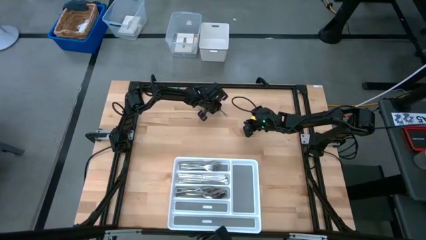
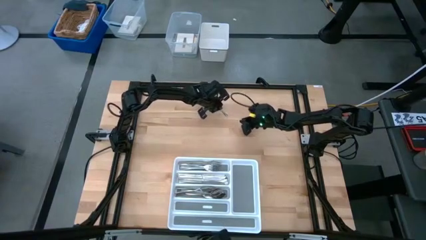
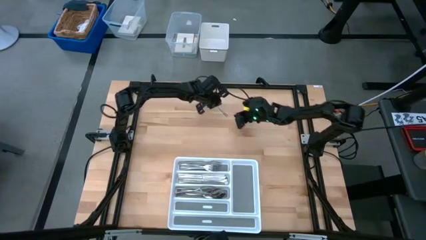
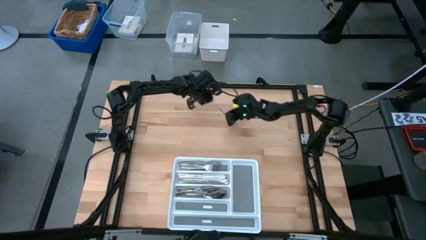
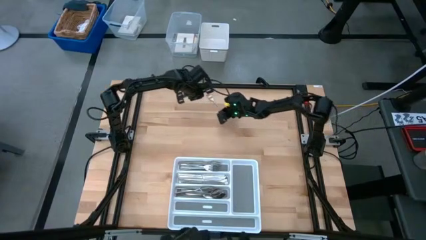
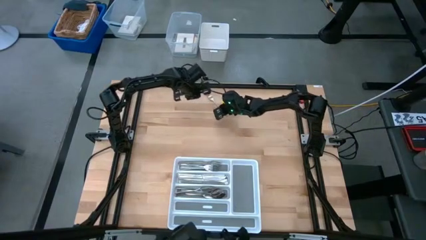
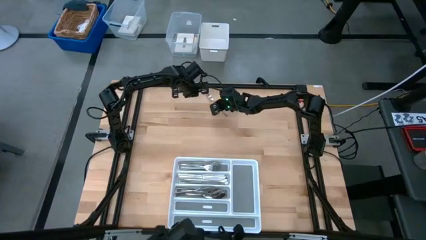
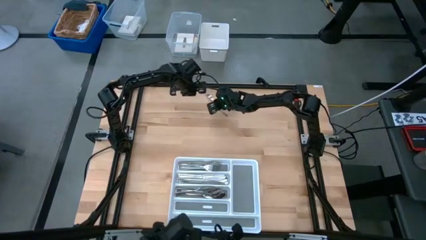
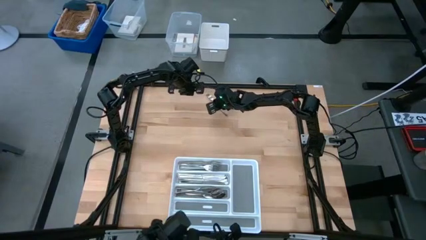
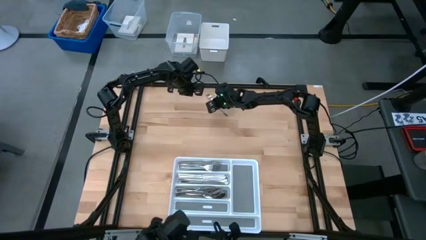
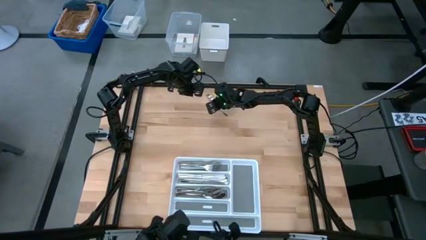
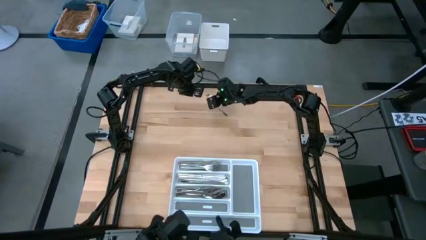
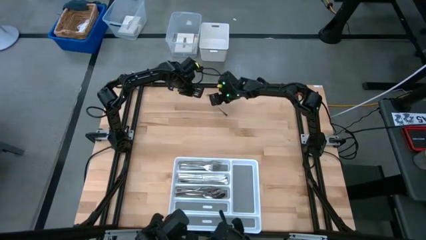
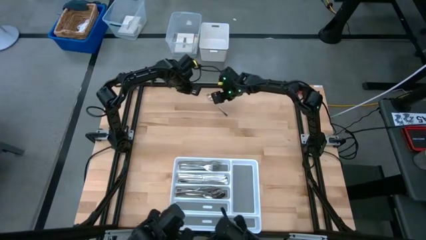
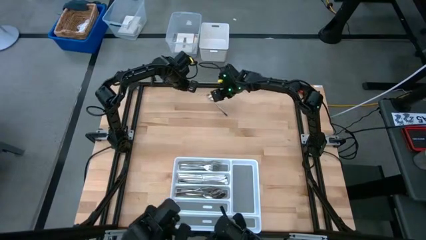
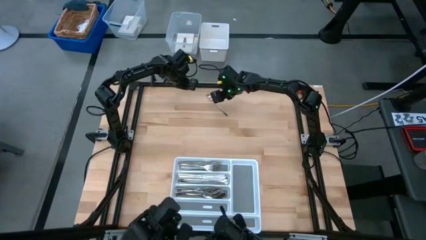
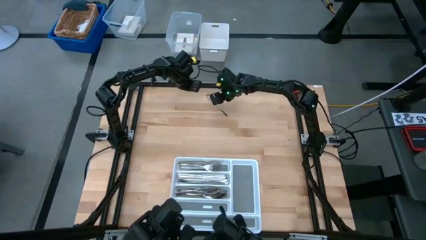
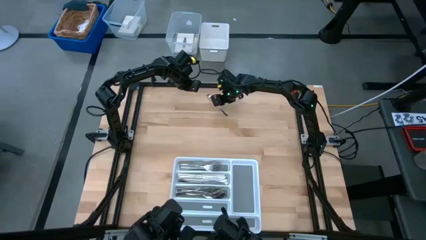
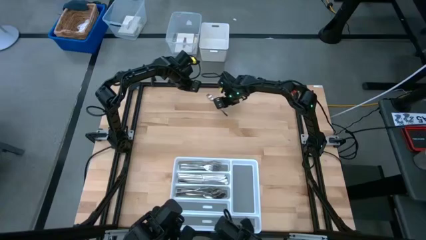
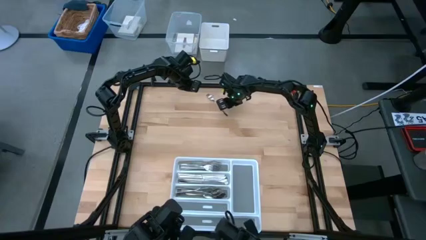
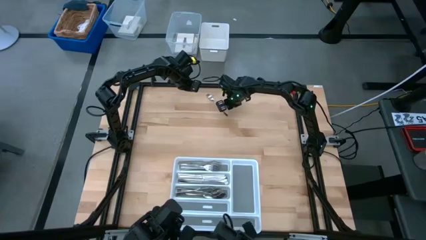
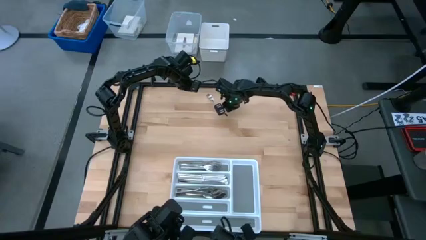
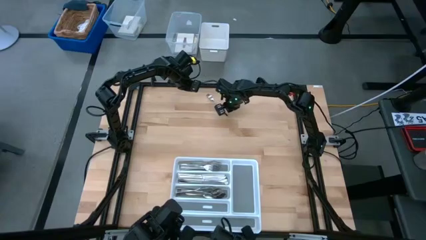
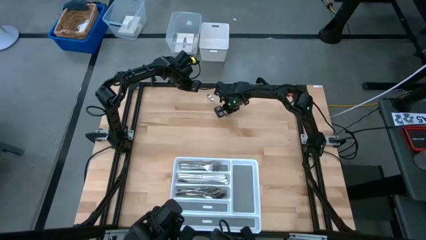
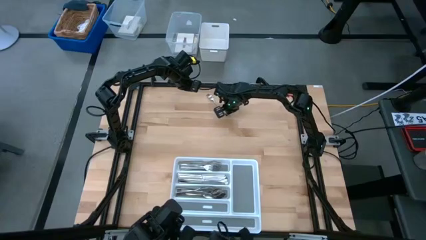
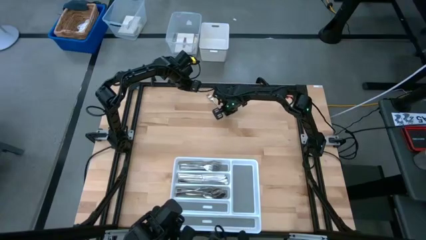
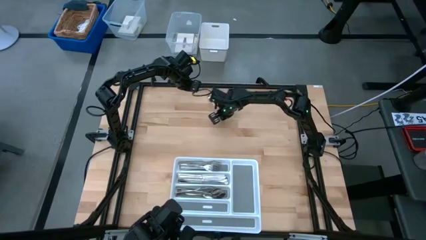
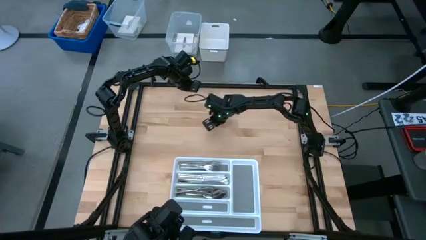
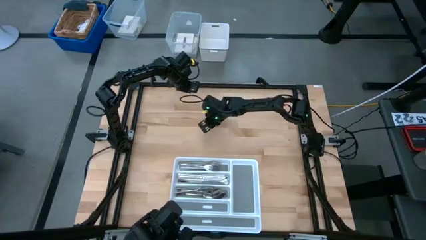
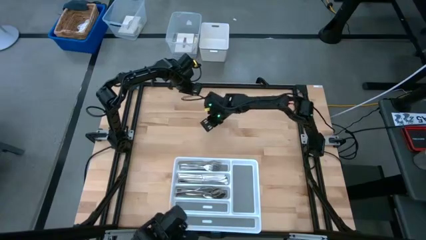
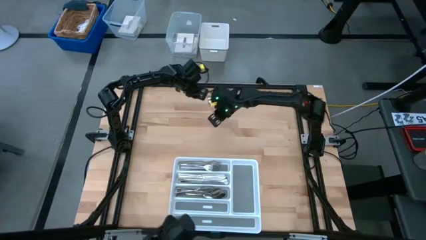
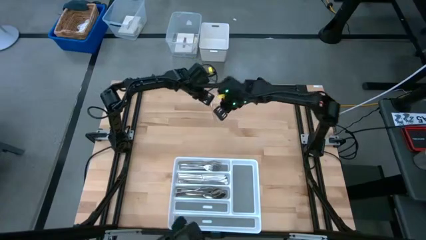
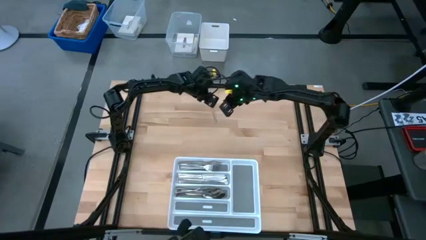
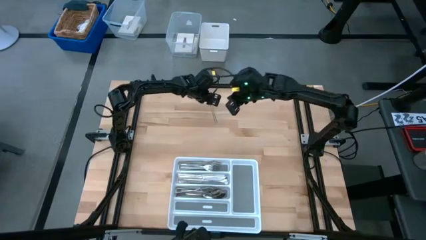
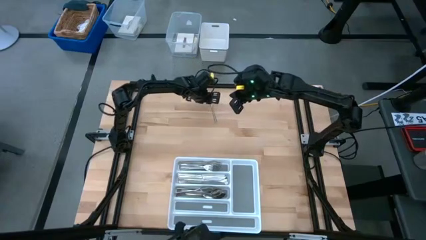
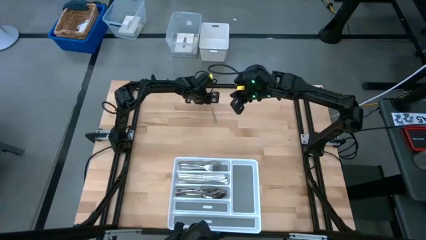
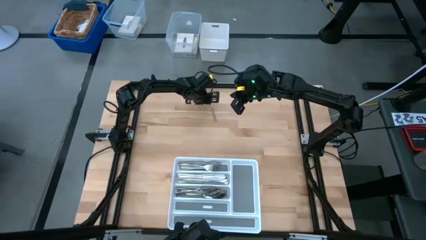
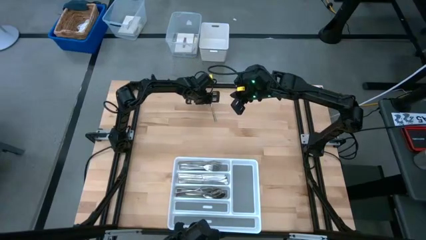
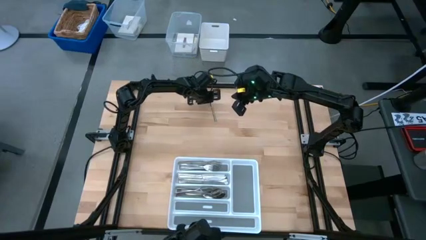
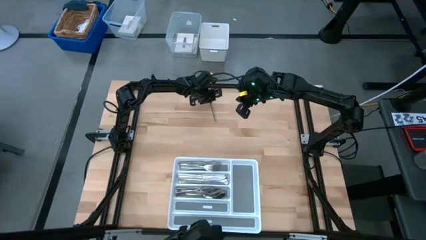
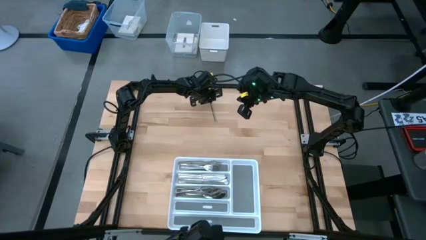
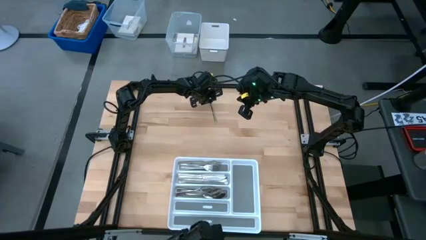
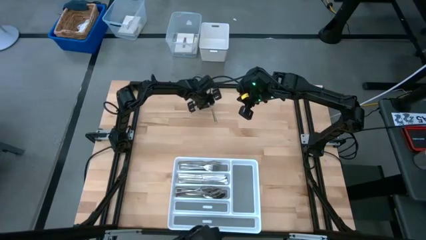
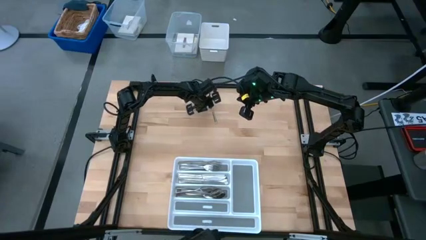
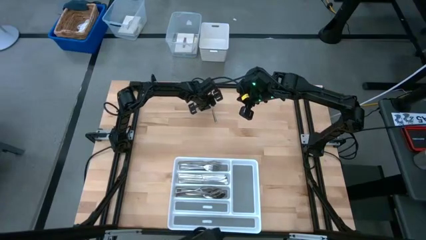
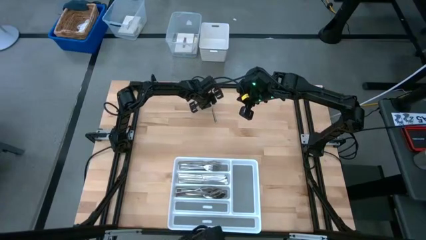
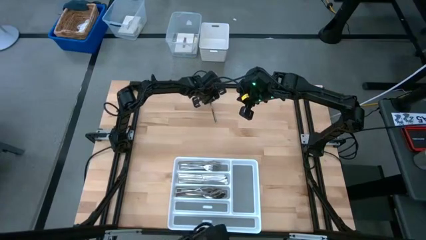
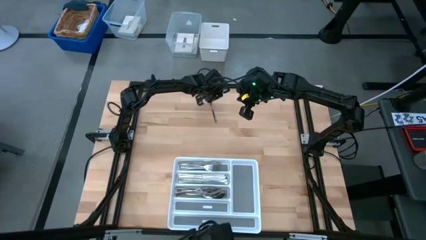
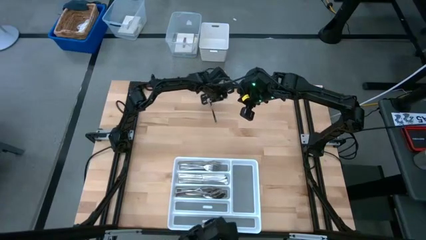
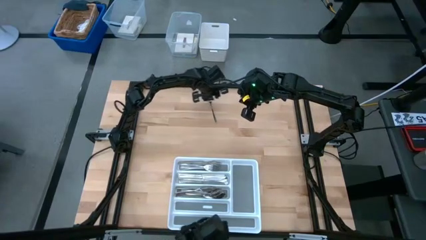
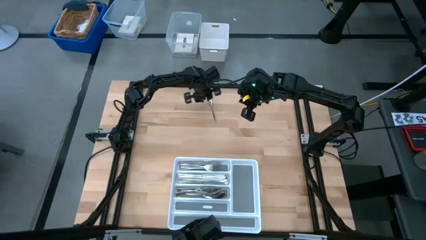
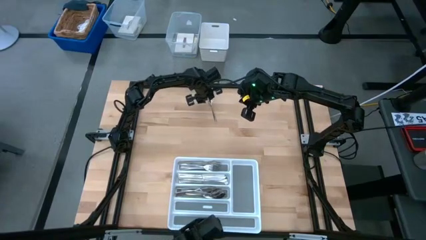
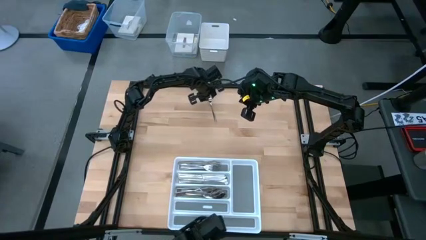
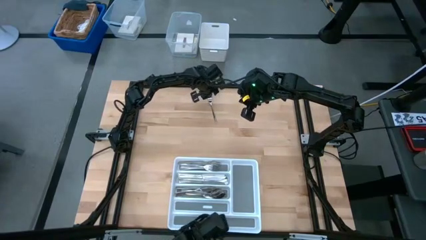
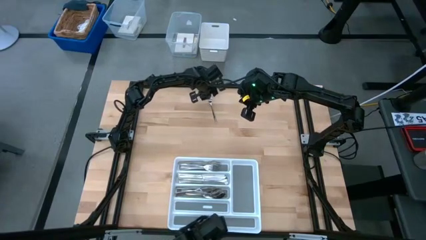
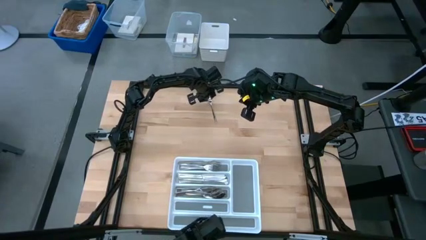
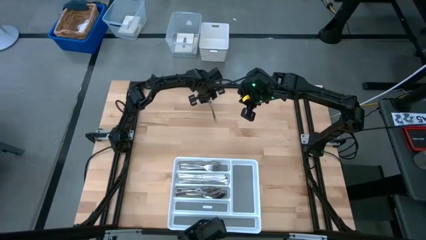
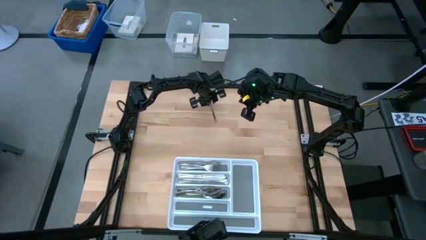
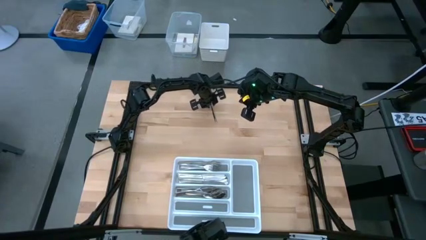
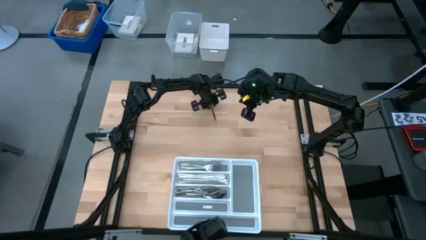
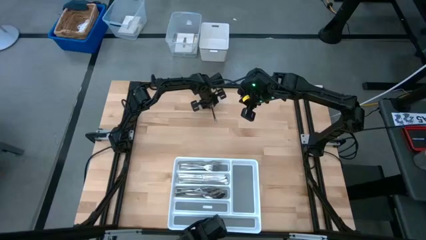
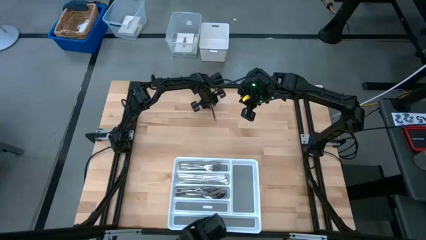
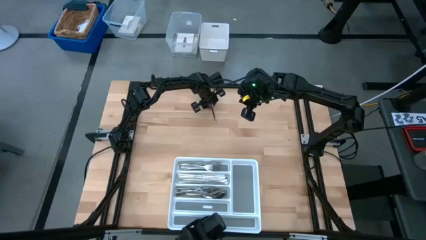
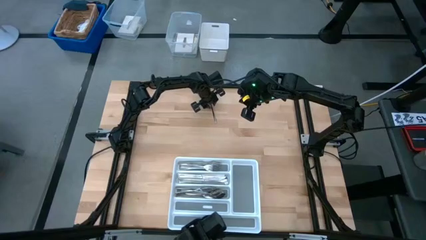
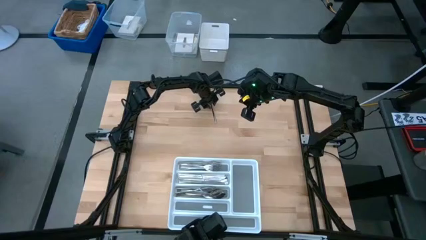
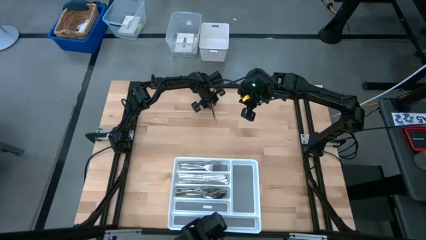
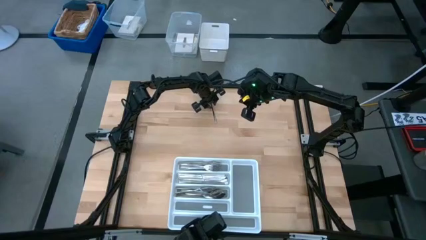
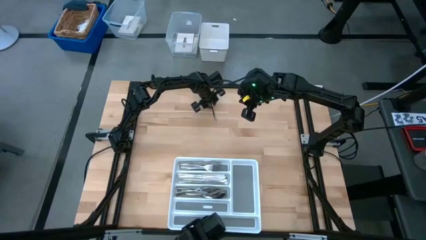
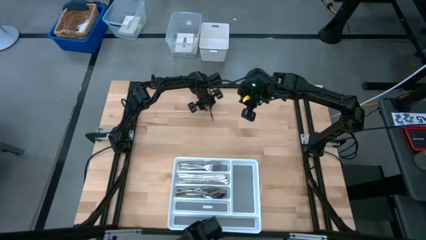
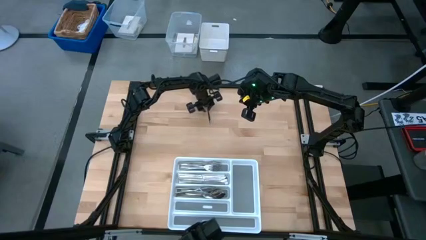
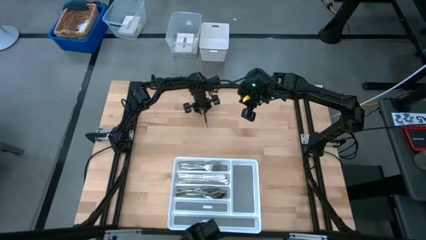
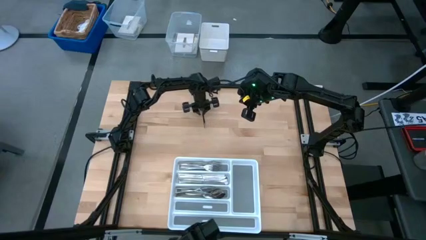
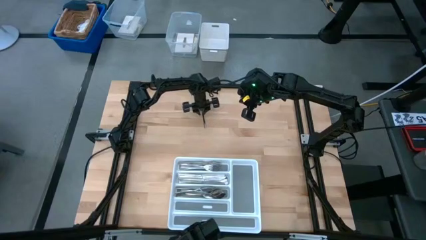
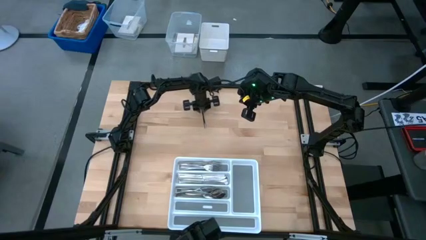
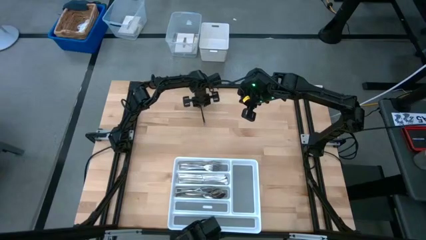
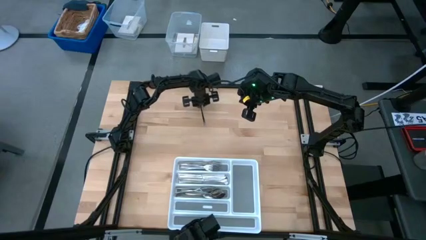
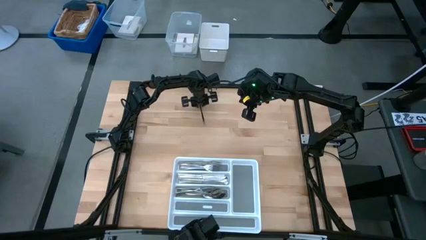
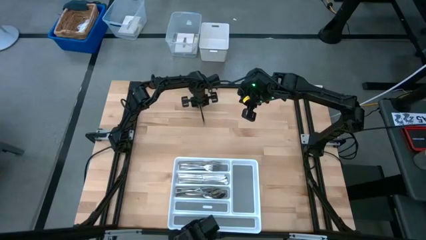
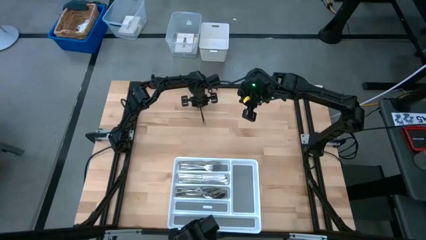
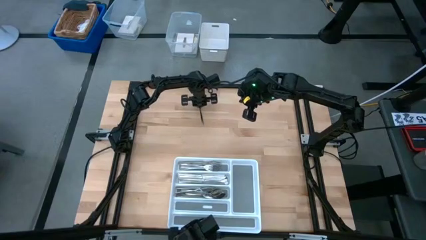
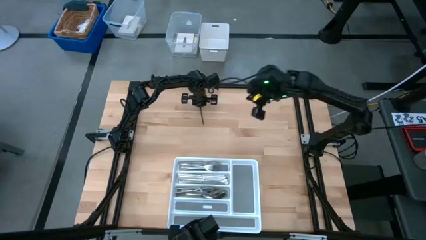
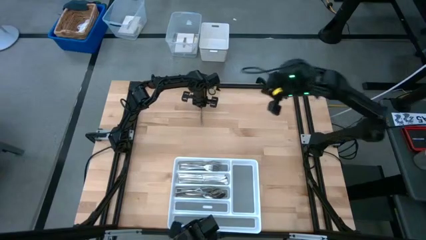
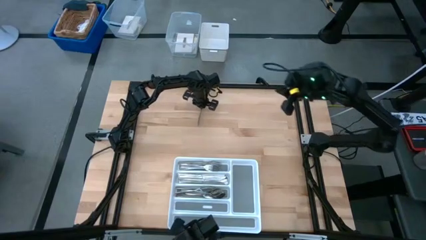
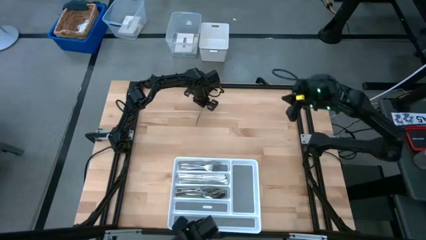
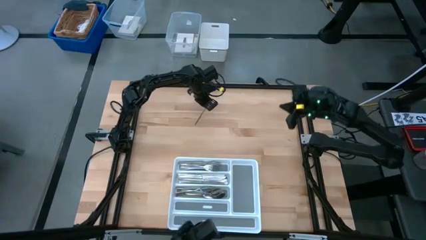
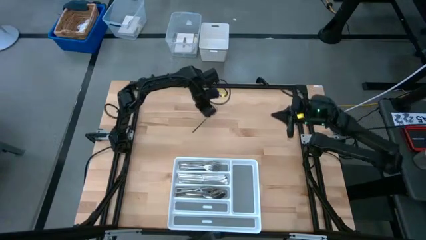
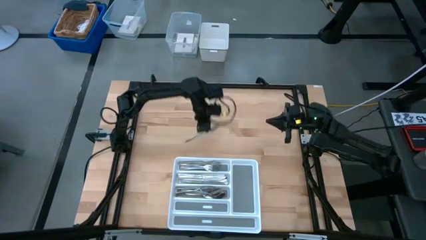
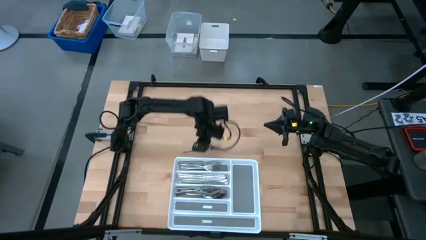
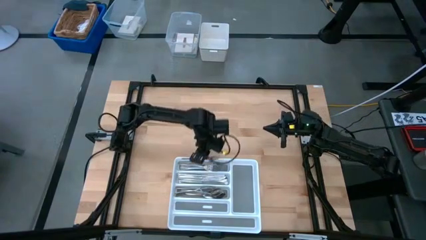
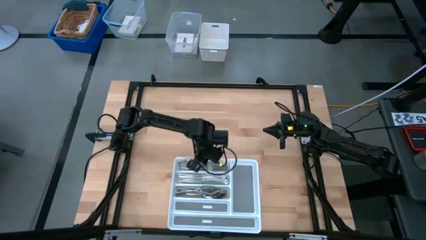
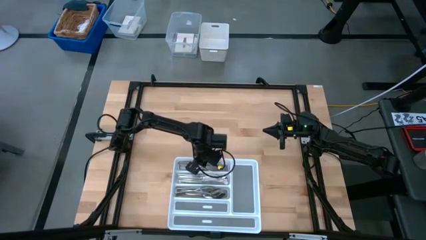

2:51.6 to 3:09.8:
Task: Sort silverware
Put the silver fork into the top section of the white silverware tray
